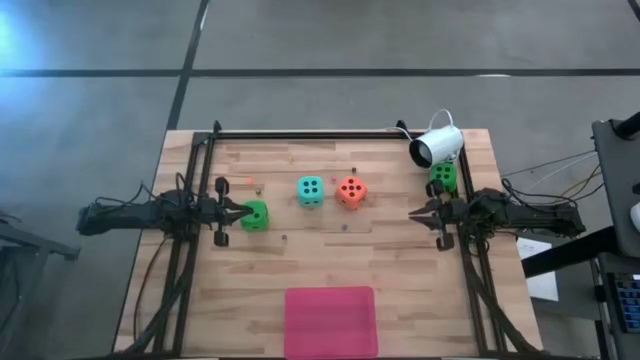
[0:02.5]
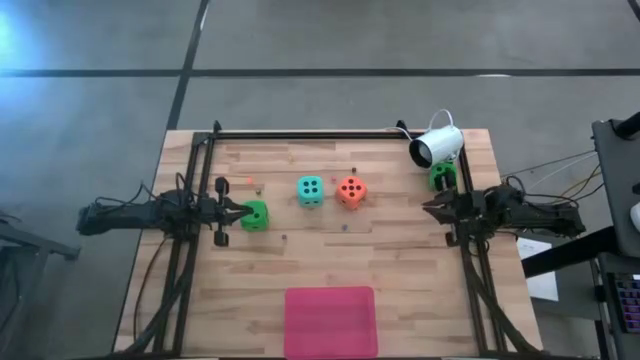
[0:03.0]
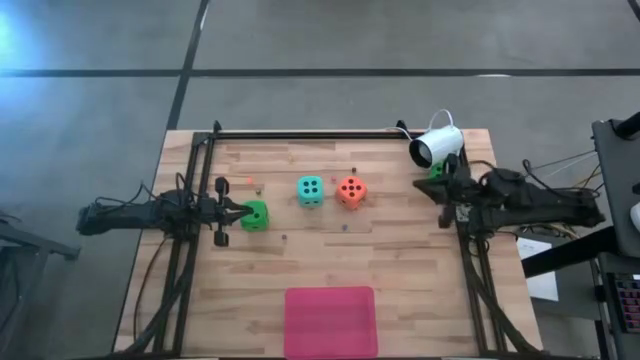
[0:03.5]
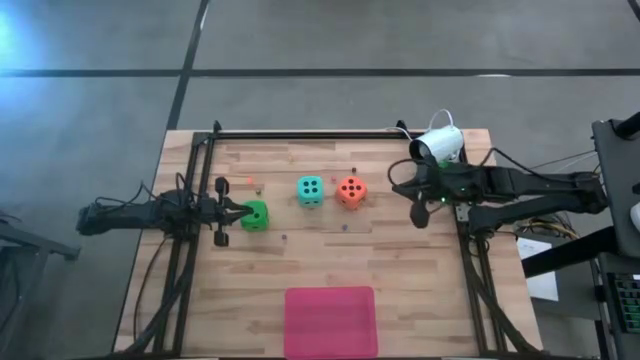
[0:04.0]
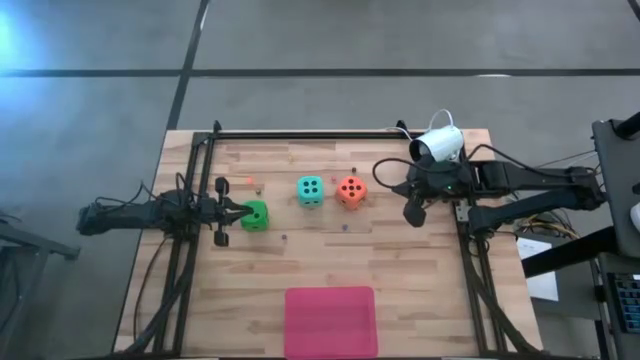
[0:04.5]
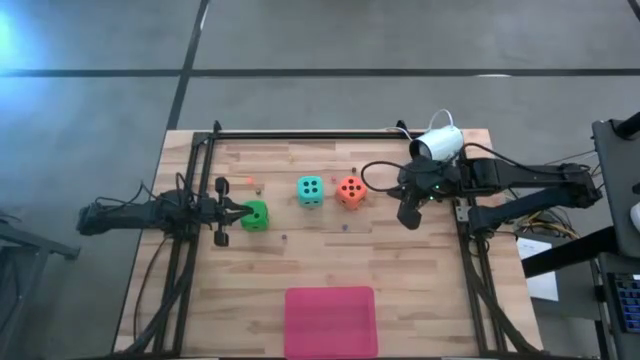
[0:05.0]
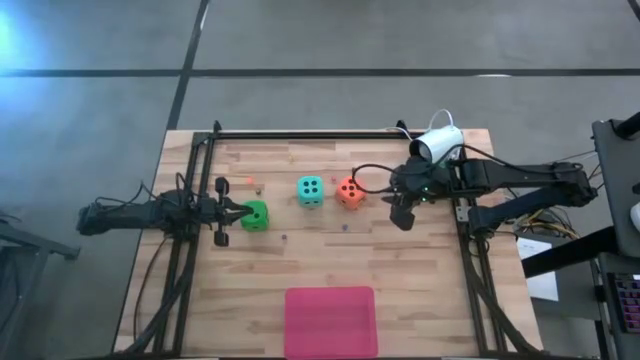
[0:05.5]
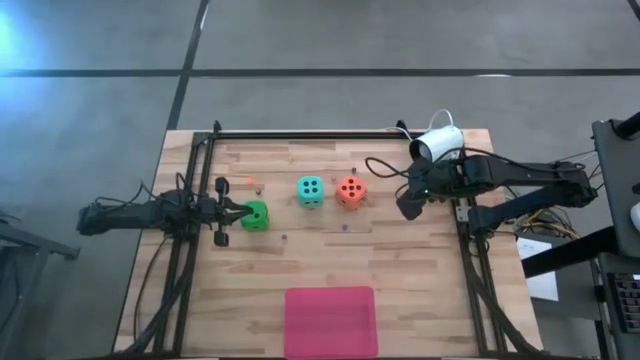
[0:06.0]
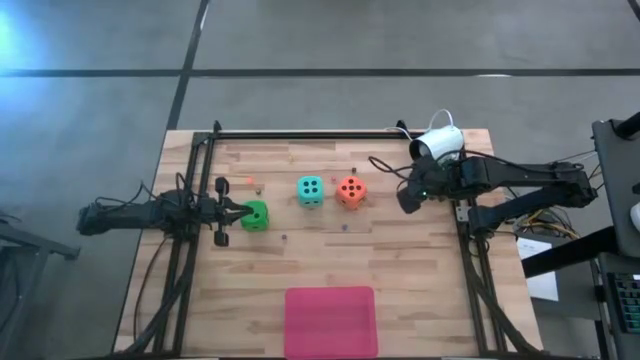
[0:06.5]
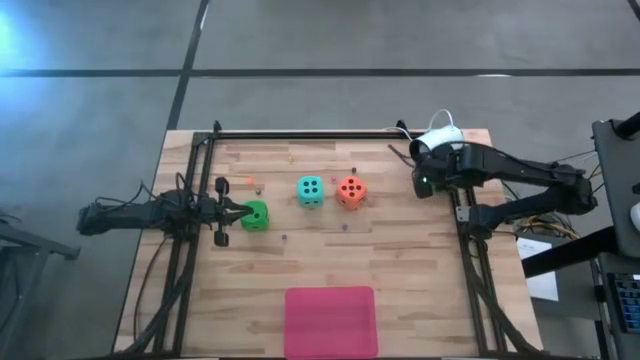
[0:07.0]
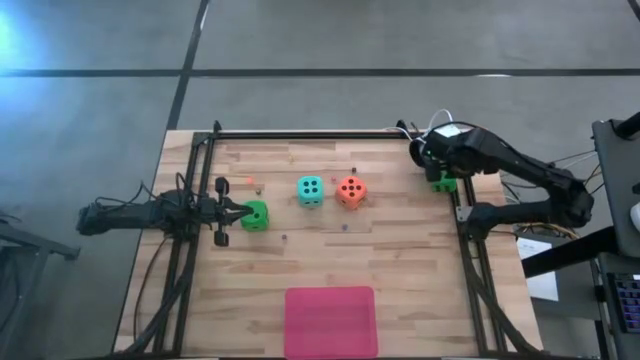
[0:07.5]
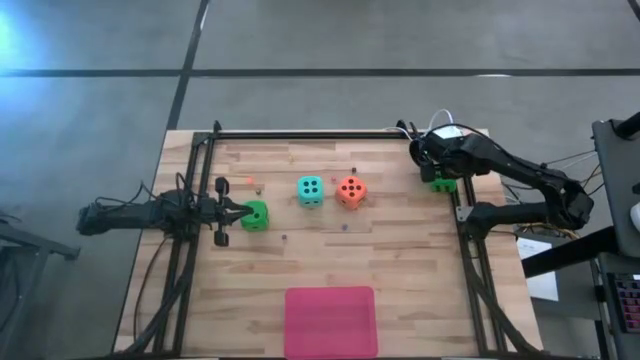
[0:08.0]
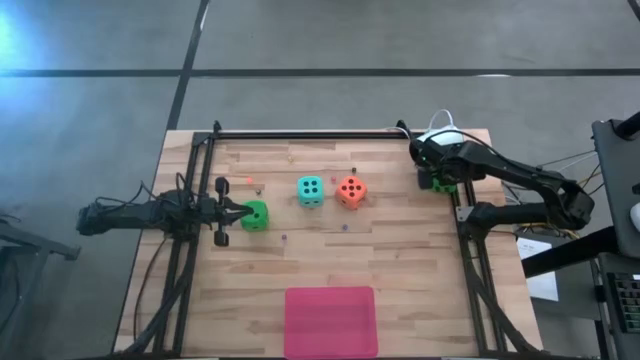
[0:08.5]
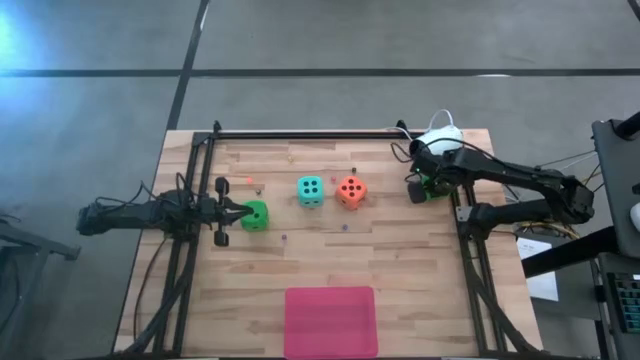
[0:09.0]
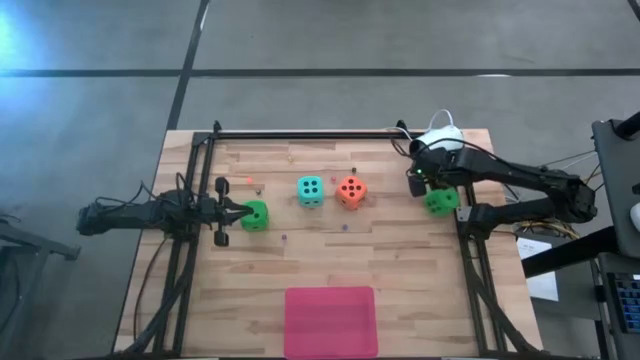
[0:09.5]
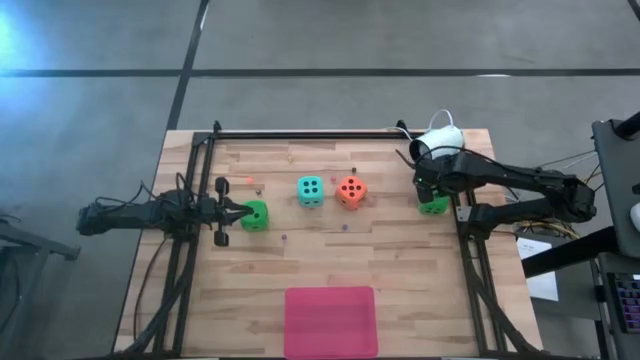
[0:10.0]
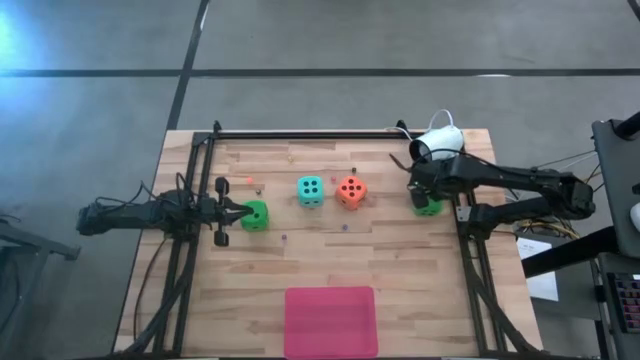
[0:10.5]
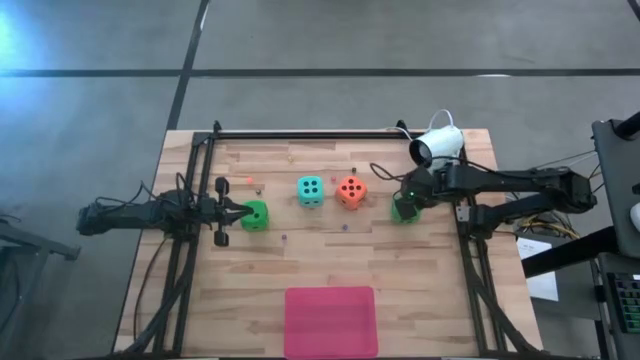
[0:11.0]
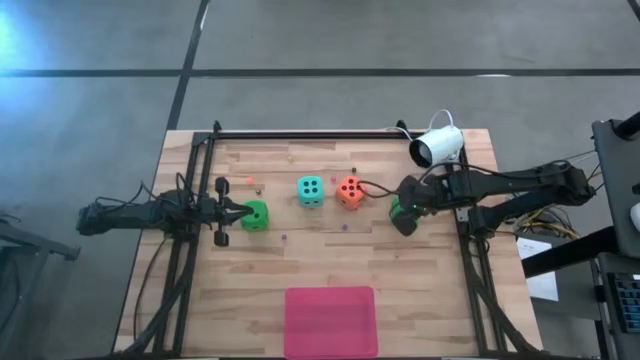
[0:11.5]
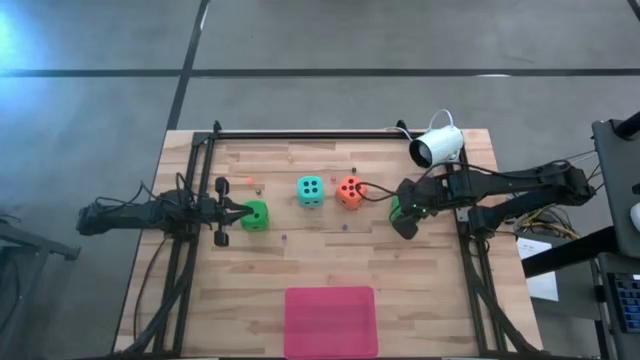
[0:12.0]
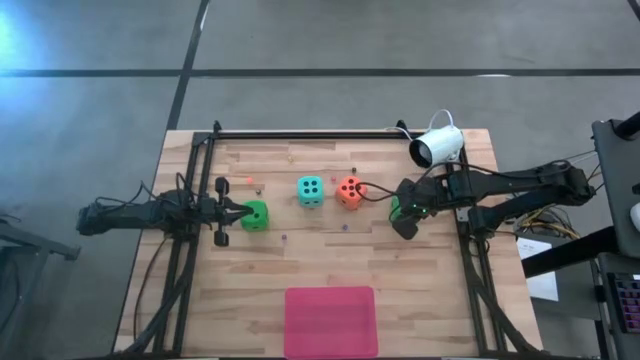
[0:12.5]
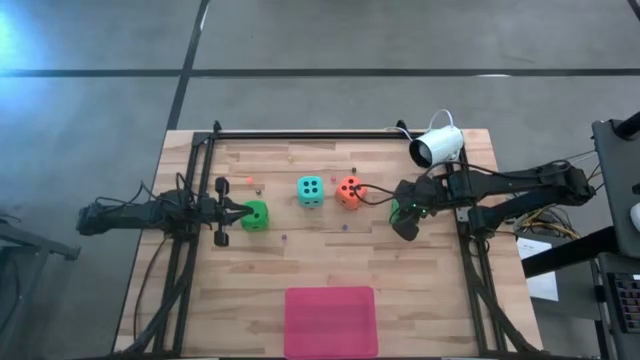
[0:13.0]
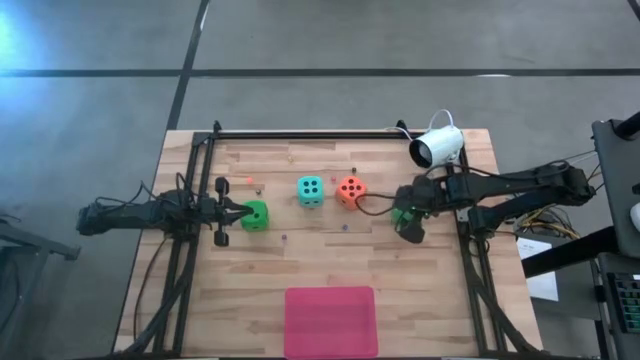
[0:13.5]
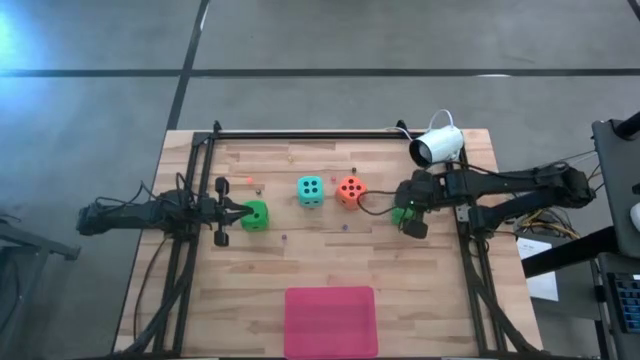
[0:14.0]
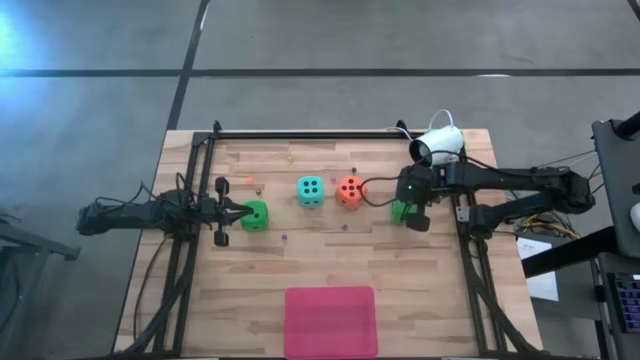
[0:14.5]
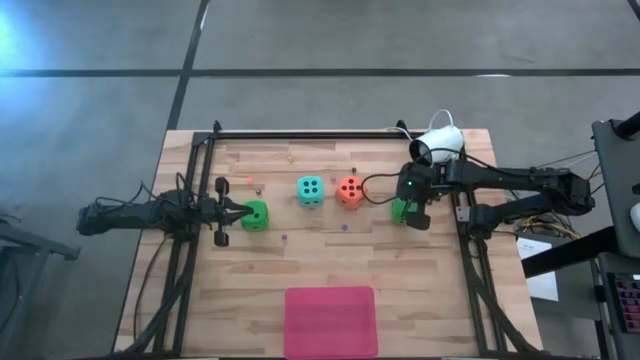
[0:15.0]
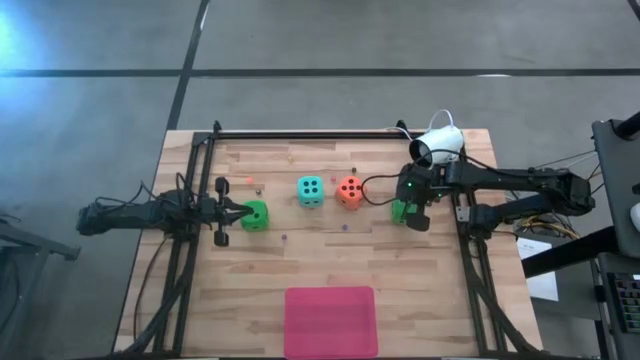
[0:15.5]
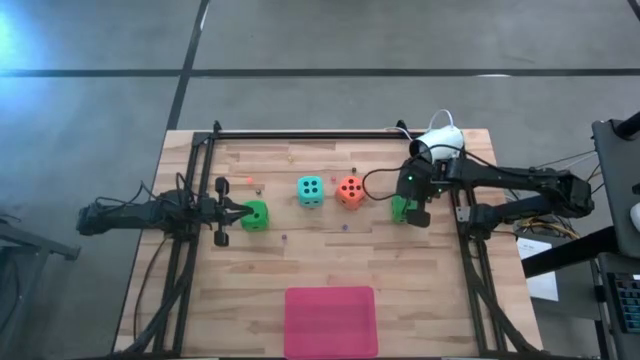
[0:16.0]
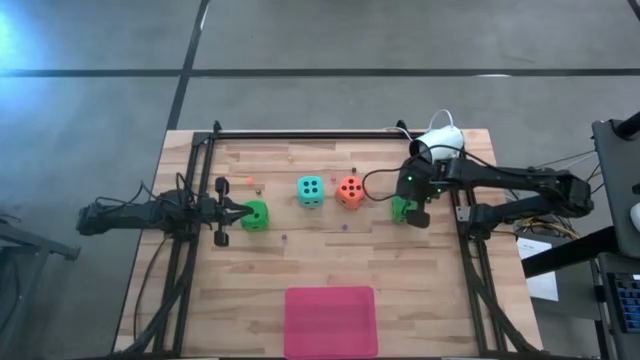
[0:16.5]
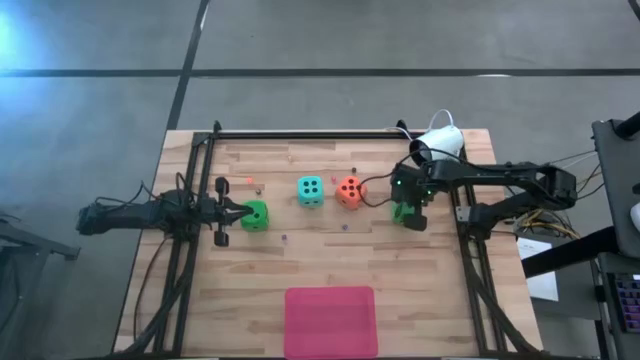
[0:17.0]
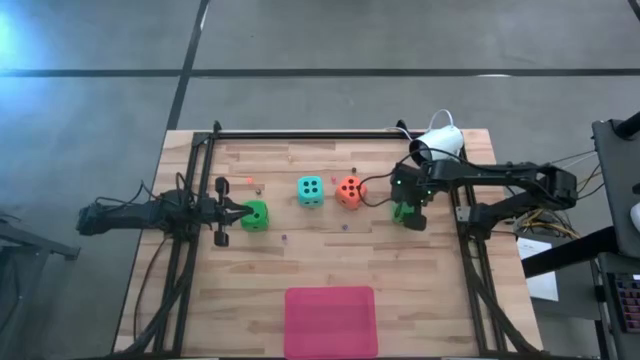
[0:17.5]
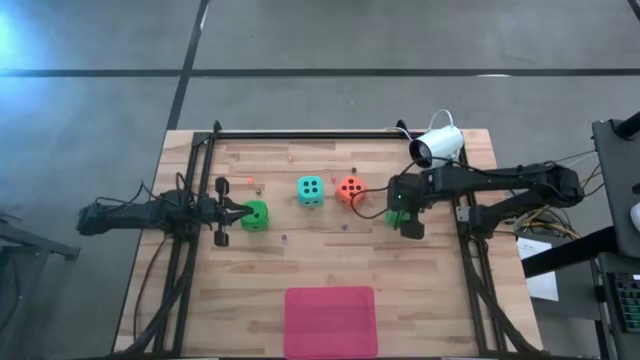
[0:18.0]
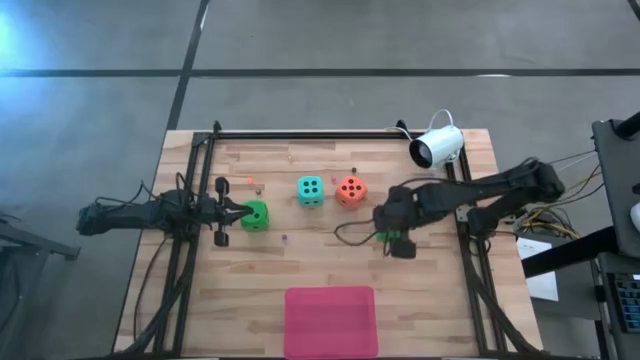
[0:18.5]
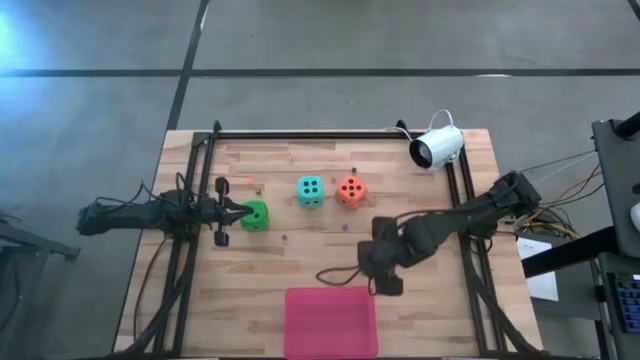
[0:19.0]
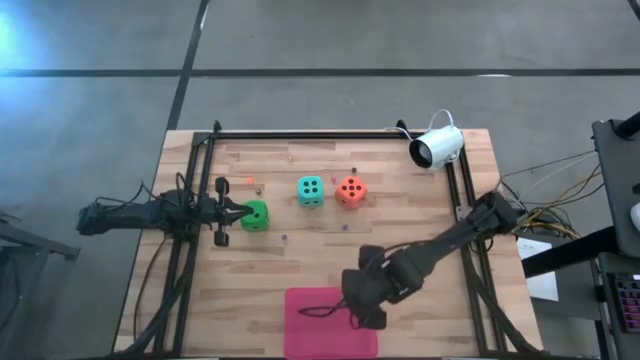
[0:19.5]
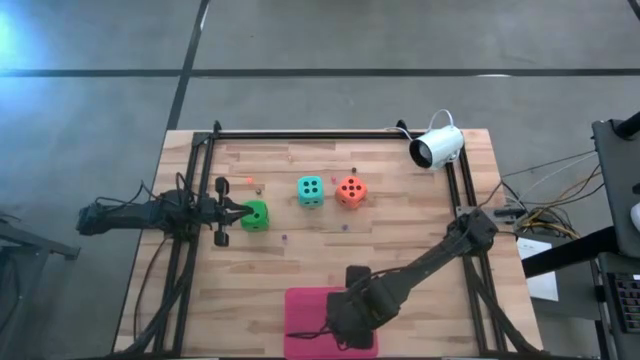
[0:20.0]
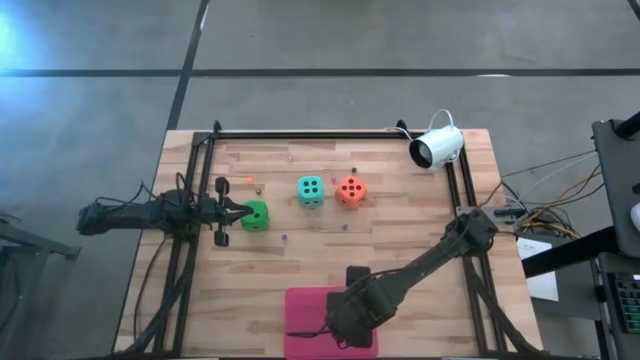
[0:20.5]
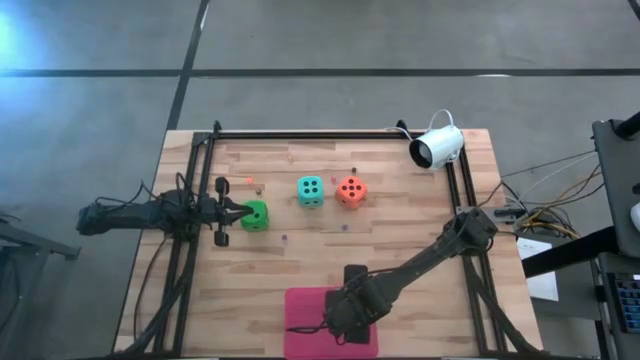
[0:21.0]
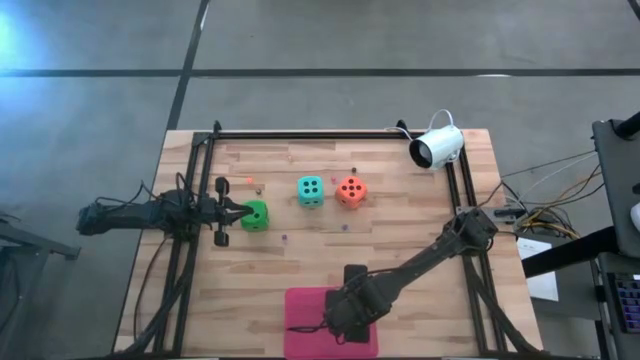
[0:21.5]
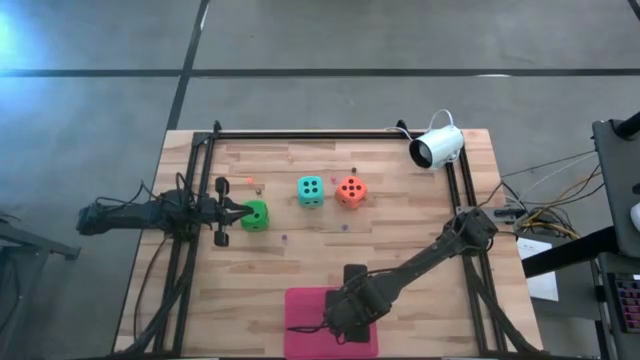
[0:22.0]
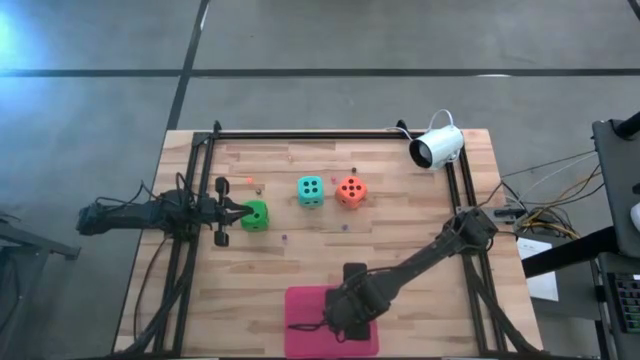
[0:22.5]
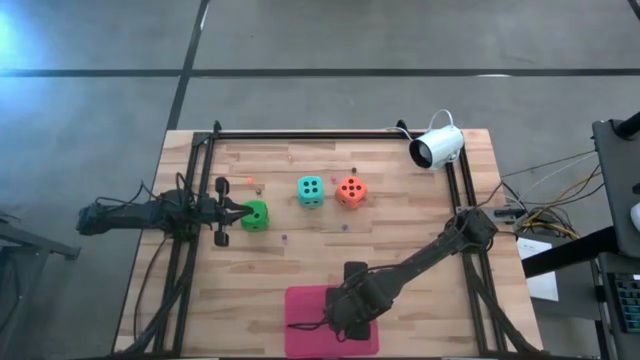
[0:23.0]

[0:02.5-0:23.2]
Task: Pick & Place Dice
Put the right green dice into the pink bin
